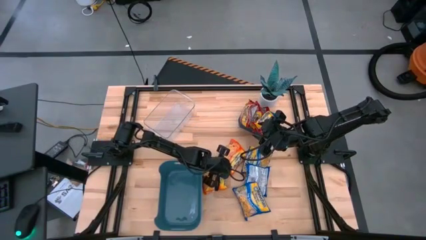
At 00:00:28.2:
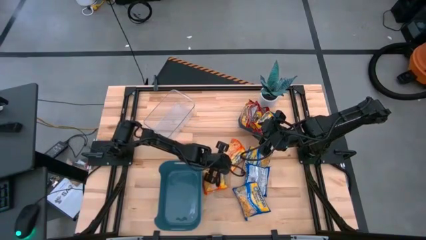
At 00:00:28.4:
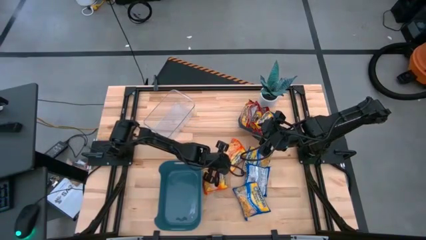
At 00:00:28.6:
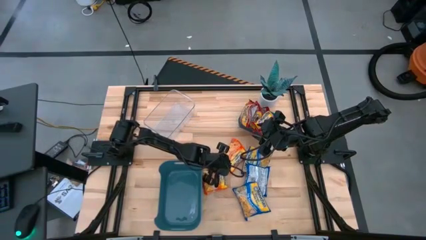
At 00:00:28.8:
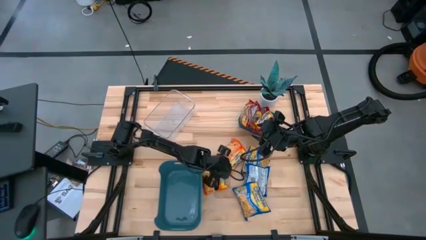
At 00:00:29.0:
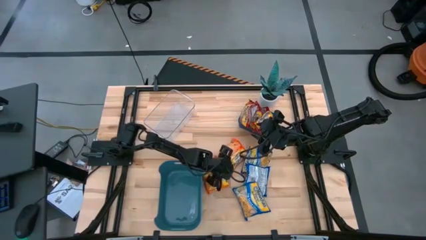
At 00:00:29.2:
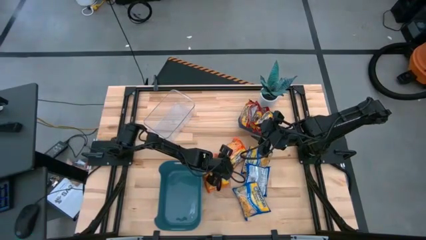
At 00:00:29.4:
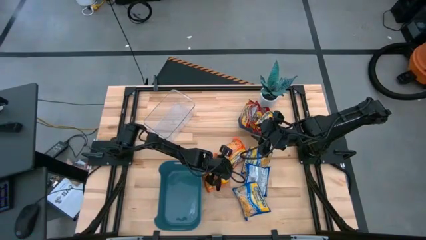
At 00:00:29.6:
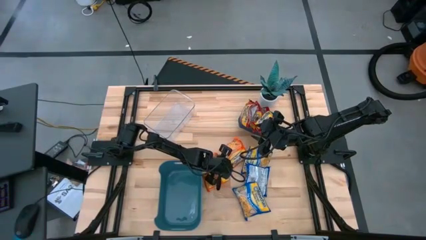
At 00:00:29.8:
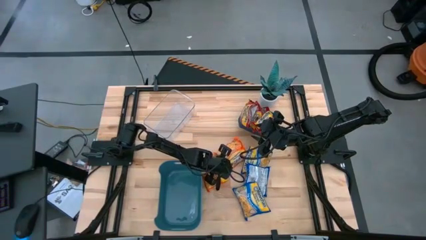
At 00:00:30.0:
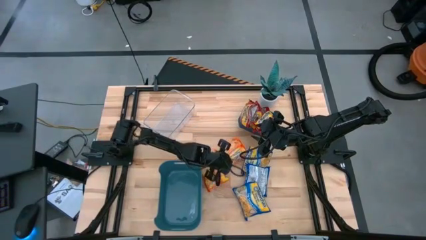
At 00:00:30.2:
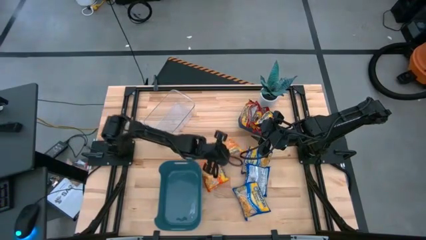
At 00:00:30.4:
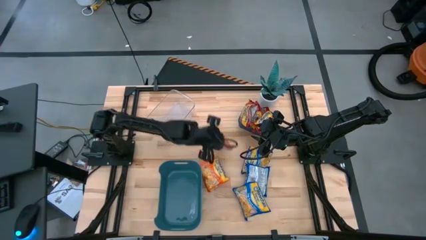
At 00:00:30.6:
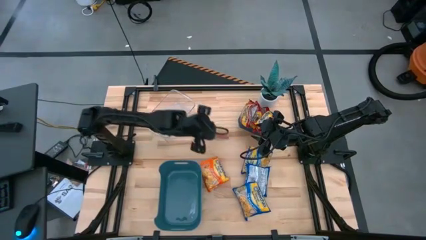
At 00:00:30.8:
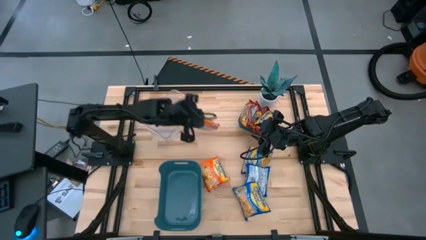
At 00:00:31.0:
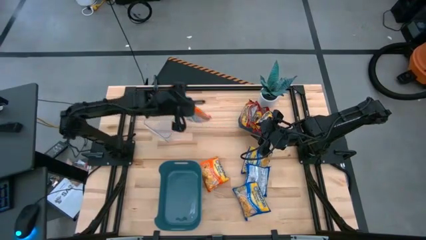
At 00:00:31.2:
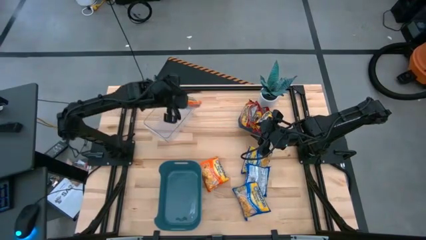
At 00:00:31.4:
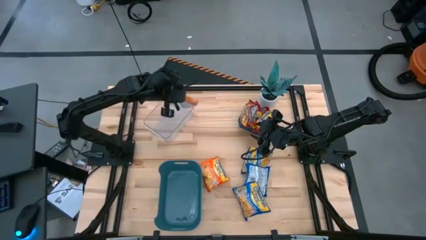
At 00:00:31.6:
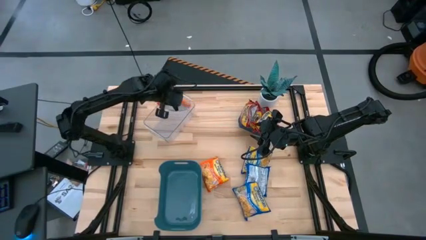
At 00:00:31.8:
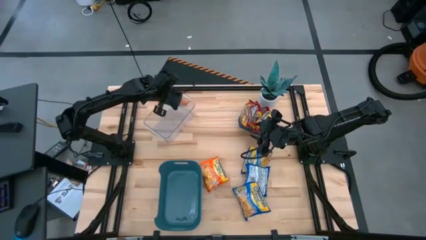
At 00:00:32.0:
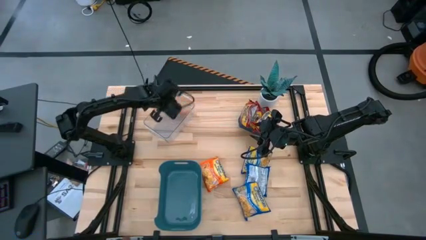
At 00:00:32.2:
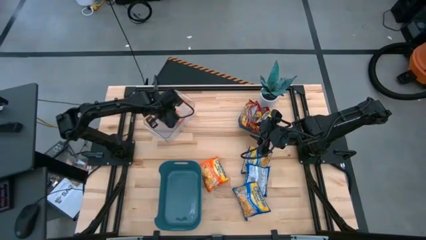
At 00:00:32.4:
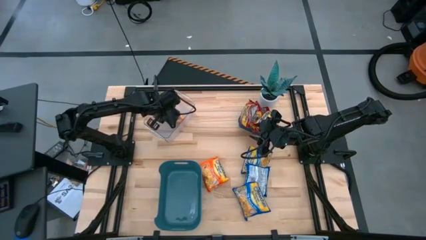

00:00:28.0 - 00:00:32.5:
Task: Sort Maruchan noodles
Put the top orange noodle pack into the transparent bin

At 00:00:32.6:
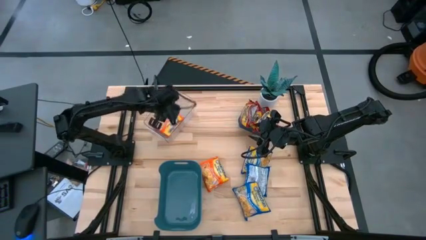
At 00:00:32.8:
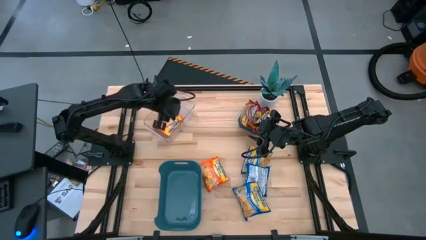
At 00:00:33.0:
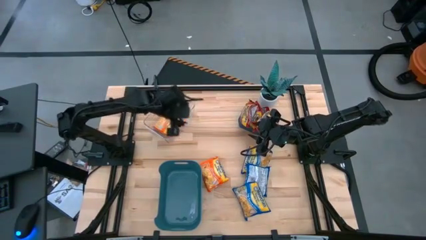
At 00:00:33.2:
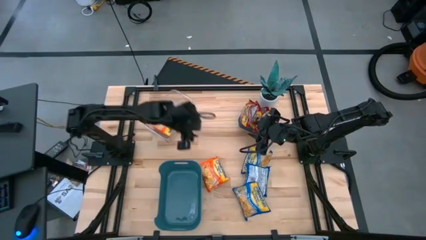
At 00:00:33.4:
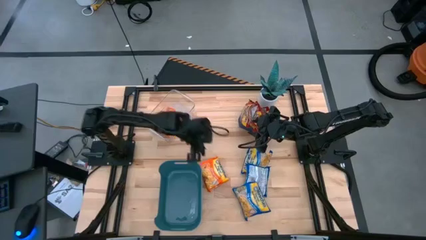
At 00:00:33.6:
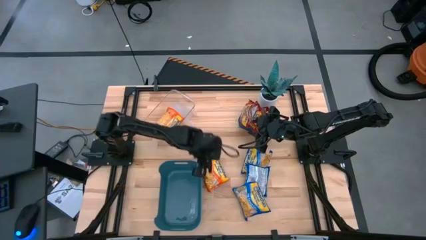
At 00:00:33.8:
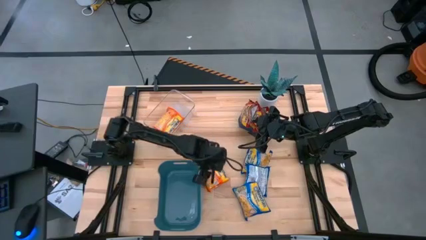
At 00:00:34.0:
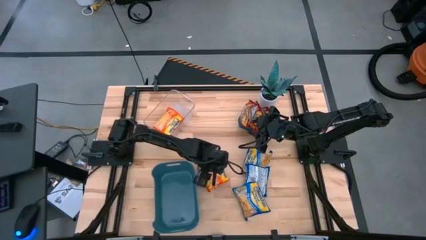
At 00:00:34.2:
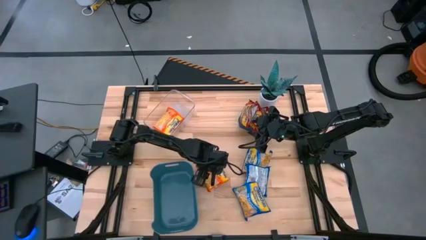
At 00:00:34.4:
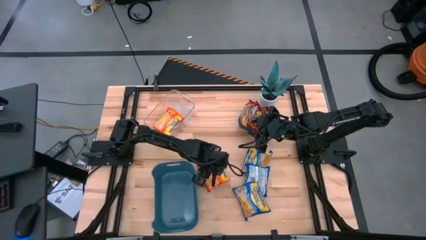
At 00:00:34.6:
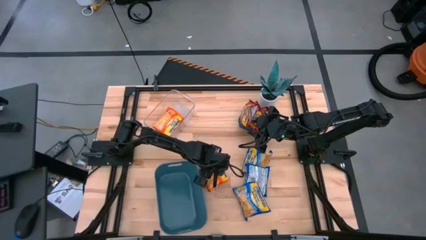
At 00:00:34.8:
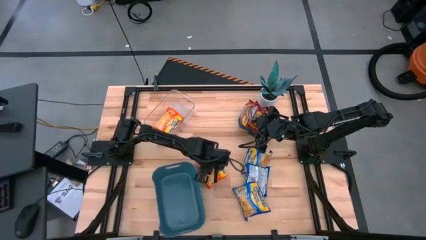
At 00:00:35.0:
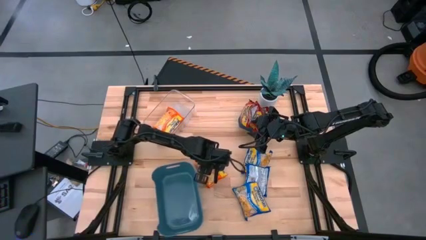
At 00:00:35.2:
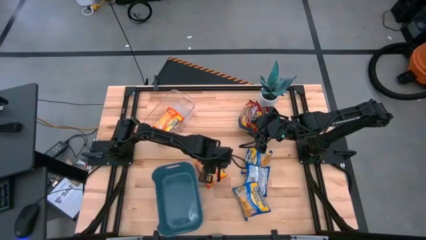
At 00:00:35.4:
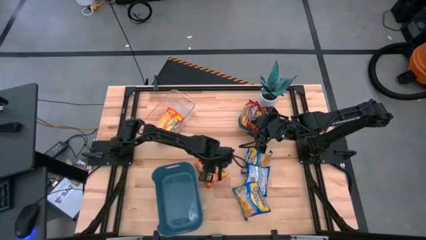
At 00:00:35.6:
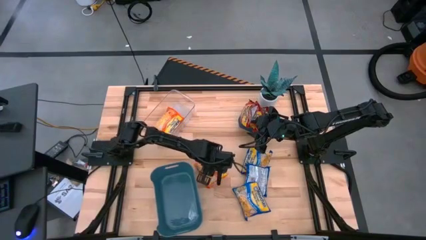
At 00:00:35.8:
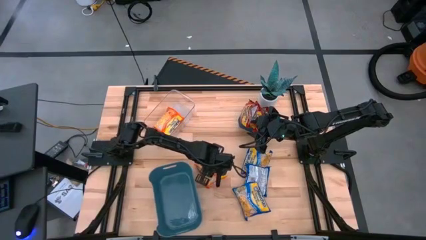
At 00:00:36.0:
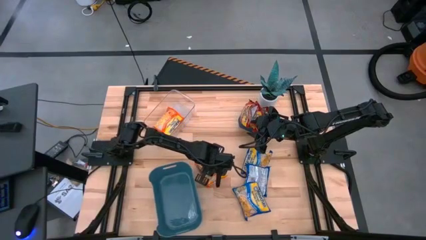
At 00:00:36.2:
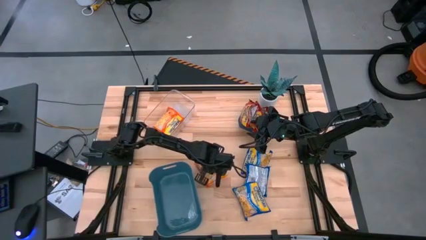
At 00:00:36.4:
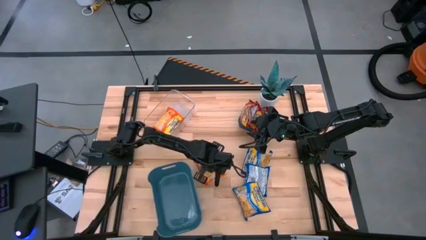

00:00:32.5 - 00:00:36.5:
Put the orange noodle pack into the transparent bin

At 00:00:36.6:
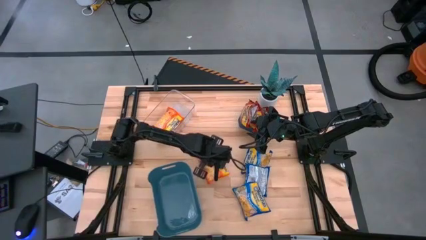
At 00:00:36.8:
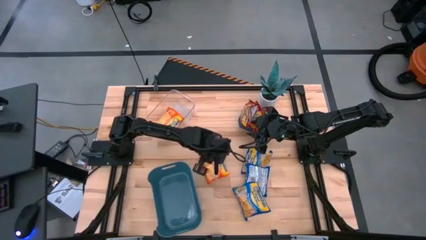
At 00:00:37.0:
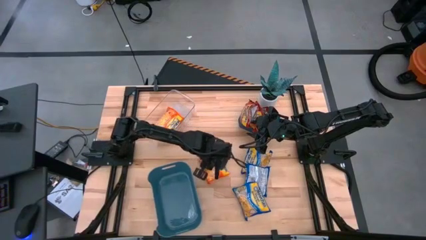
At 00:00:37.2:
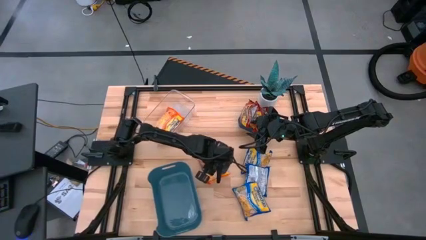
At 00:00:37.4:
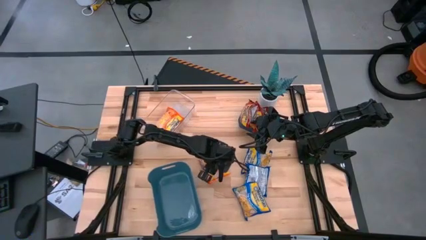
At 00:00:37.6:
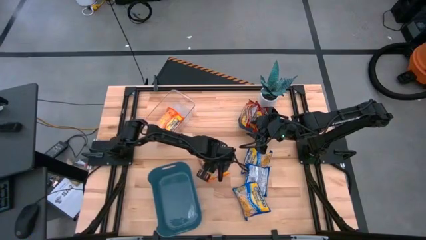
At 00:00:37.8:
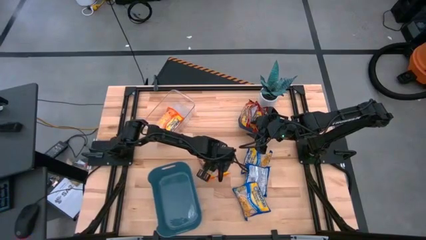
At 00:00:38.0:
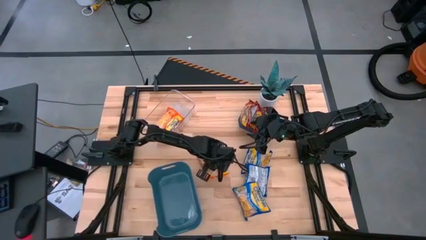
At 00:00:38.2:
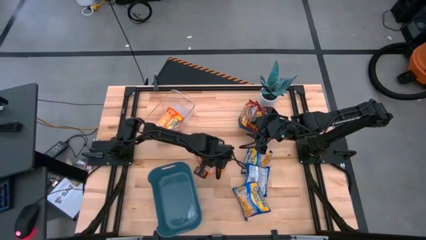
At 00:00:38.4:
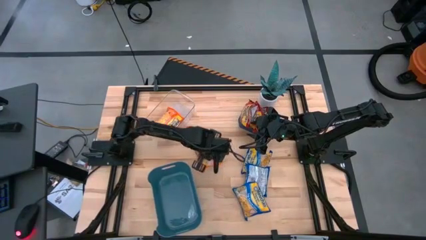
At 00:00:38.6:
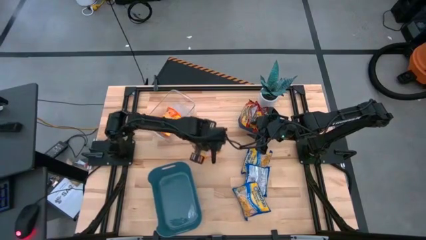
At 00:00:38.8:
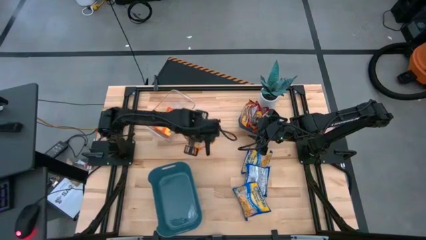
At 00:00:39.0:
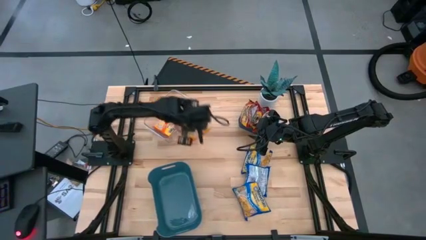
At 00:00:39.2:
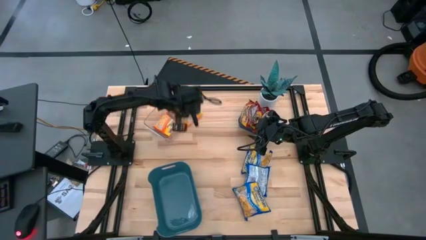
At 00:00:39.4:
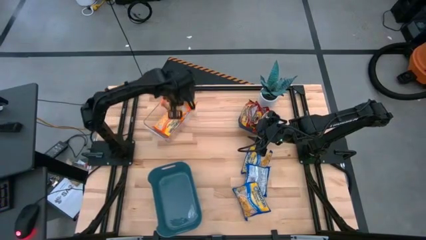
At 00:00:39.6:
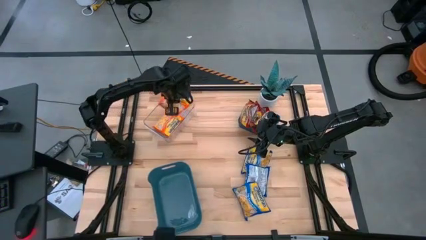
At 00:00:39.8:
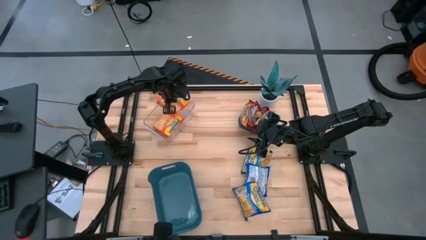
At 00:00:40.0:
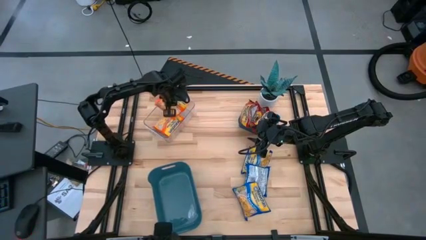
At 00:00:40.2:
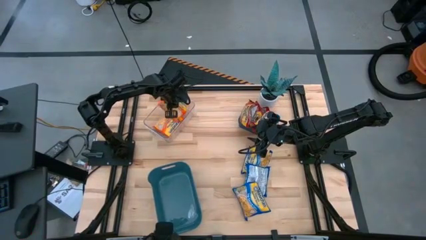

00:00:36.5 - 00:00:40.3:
Put the orange noodle pack into the transparent bin

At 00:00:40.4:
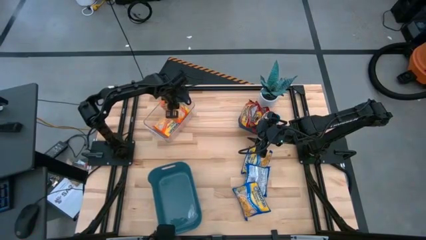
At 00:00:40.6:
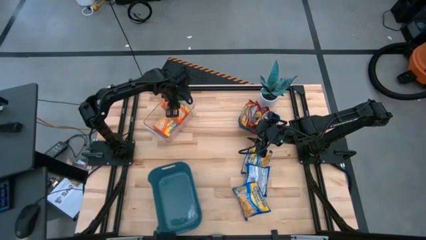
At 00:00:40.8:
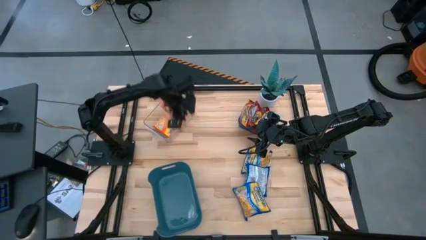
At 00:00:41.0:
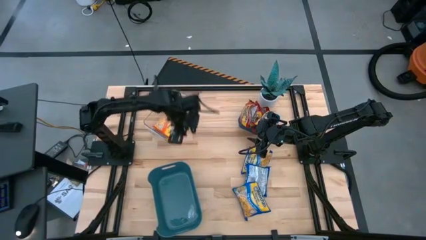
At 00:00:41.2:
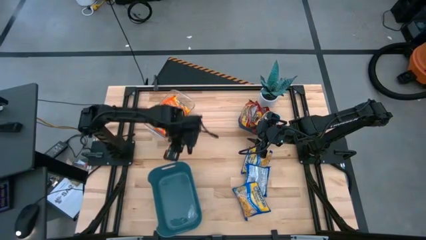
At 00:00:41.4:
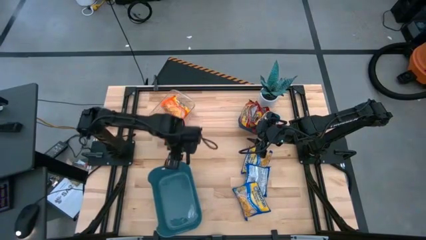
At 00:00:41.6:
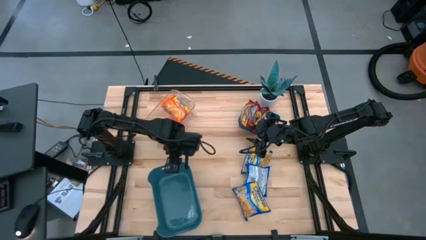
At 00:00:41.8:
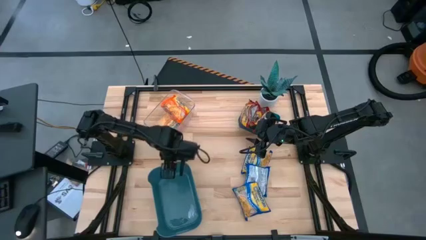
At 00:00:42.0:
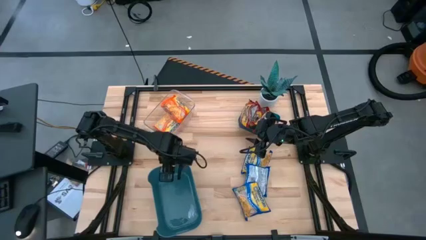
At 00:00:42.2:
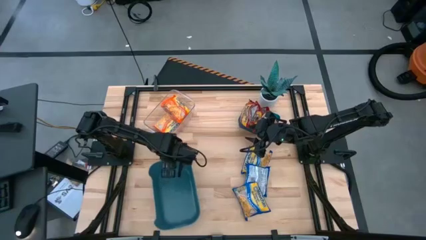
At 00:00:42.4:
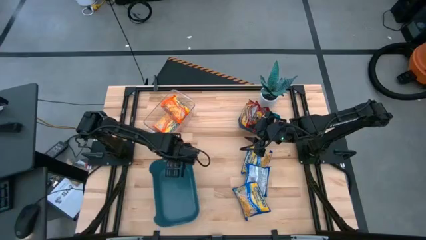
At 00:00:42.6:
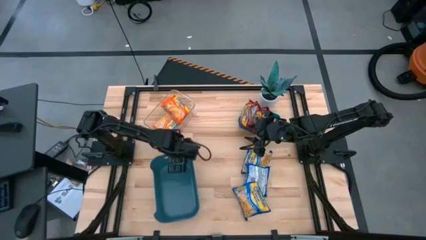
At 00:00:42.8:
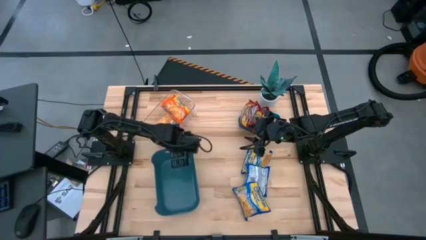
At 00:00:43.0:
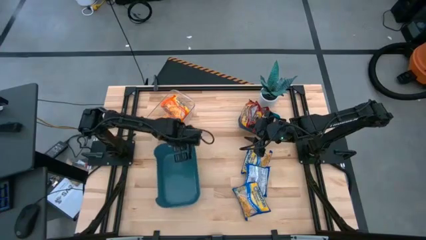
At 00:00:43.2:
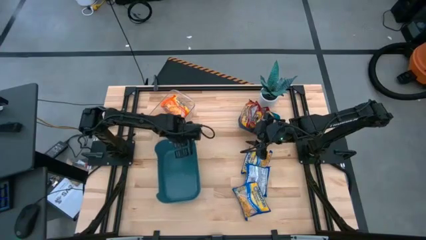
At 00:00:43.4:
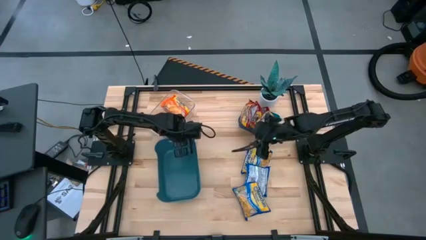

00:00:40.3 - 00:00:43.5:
Adjust the big blue bin

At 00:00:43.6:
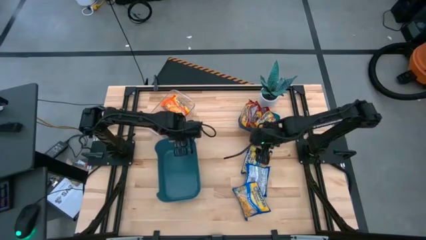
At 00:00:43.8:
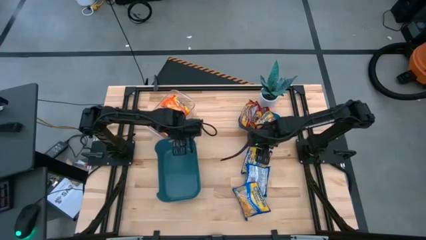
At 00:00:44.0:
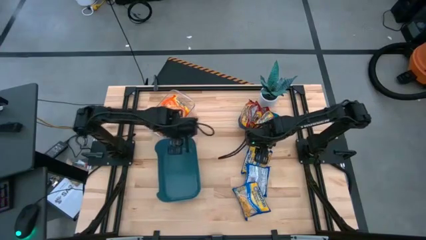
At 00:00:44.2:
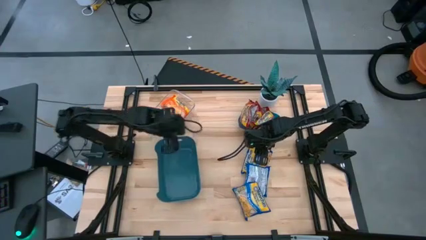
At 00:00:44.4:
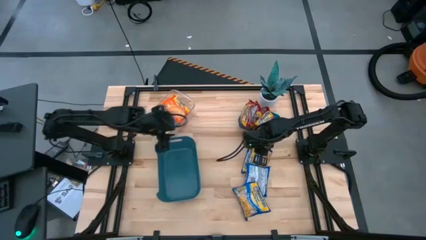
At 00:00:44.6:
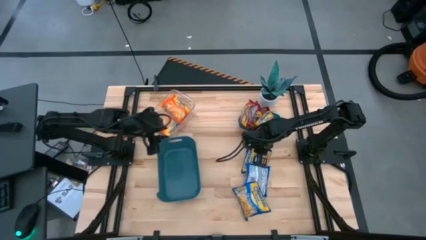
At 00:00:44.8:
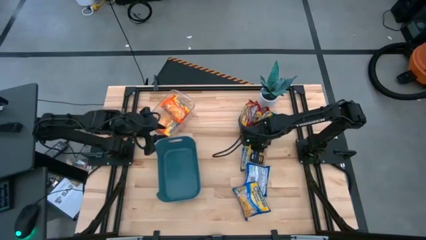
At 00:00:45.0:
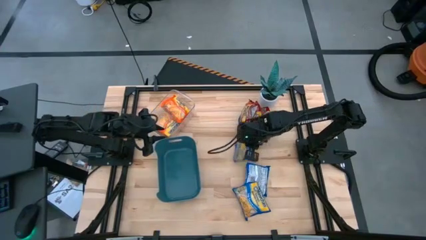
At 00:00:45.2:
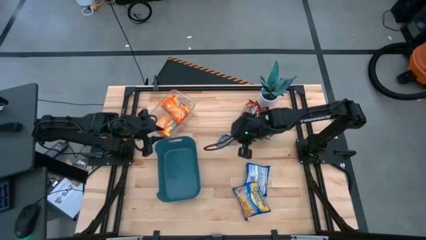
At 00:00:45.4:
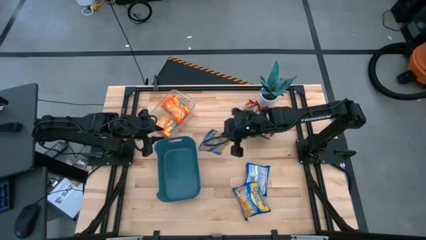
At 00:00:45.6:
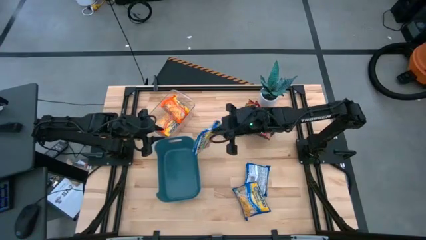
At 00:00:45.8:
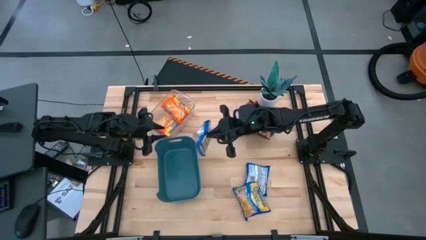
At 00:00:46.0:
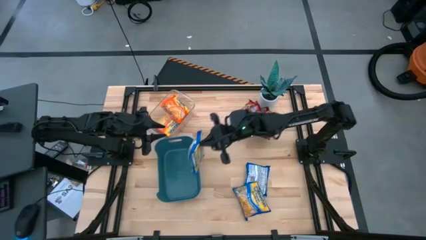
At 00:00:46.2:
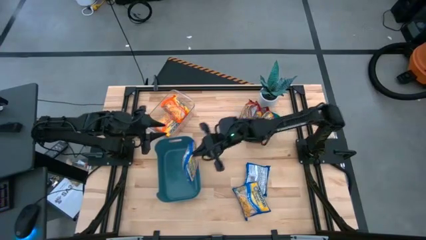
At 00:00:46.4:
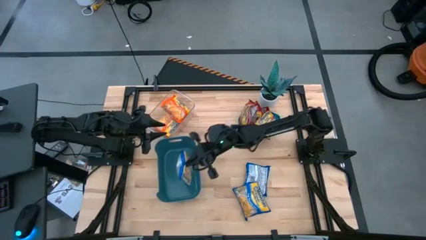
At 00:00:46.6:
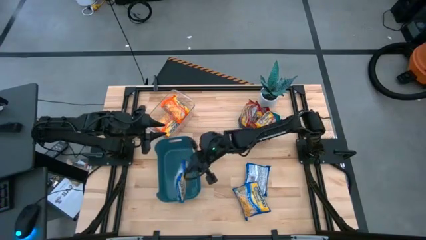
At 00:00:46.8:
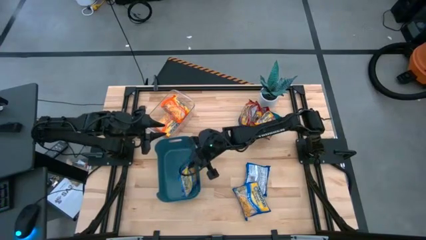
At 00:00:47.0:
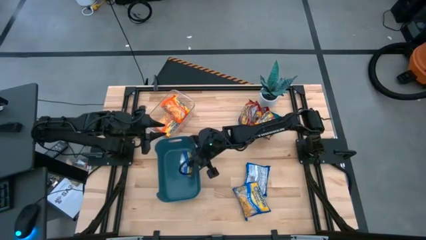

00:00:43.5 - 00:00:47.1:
Put the top blue noodle pack into the big blue bin
